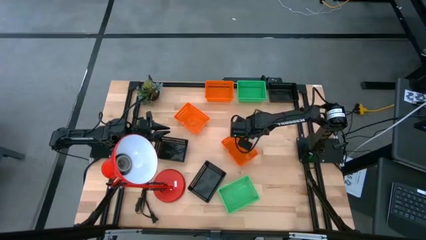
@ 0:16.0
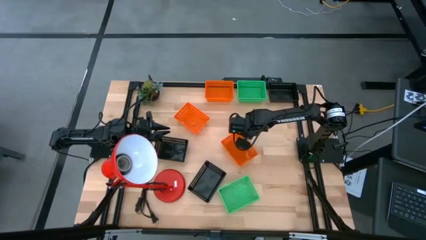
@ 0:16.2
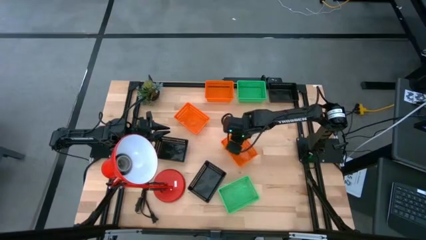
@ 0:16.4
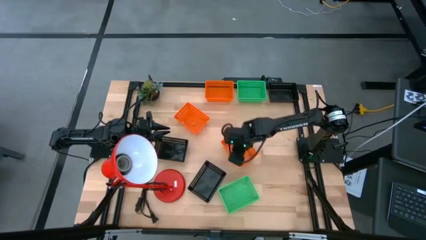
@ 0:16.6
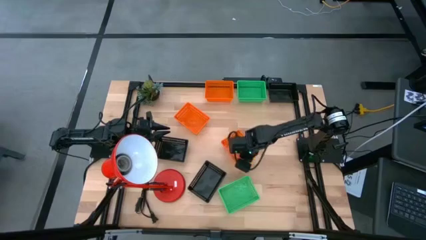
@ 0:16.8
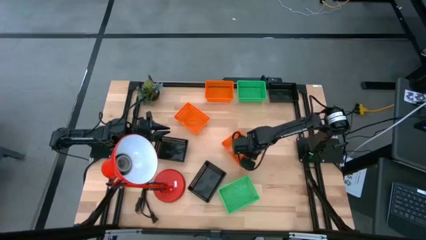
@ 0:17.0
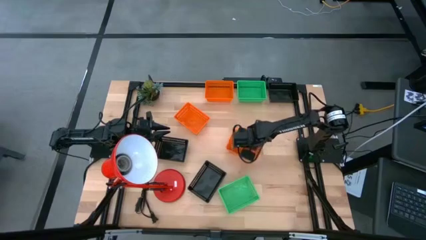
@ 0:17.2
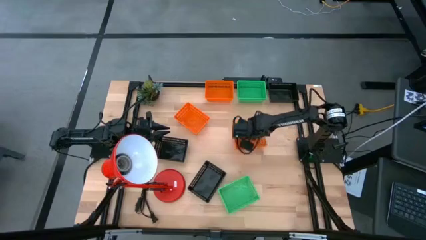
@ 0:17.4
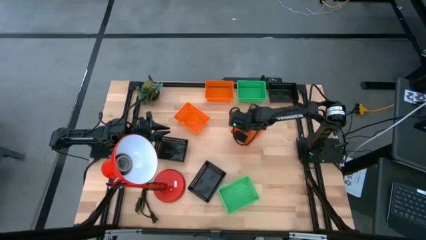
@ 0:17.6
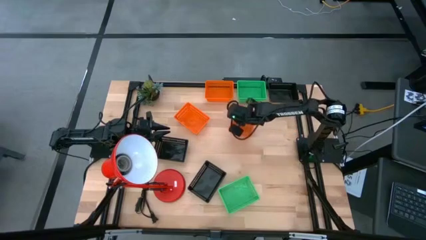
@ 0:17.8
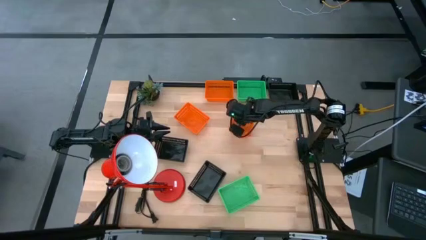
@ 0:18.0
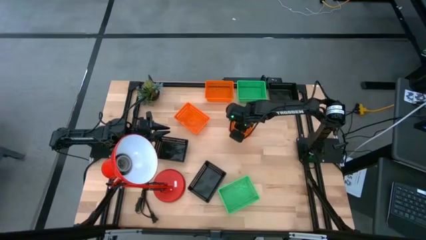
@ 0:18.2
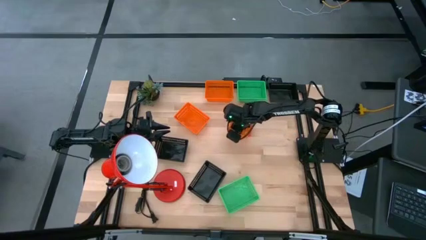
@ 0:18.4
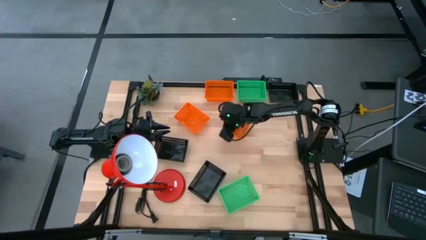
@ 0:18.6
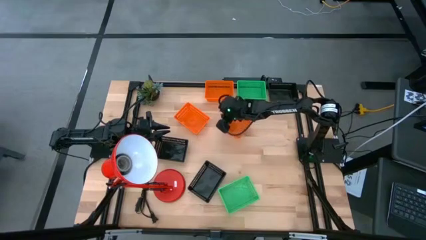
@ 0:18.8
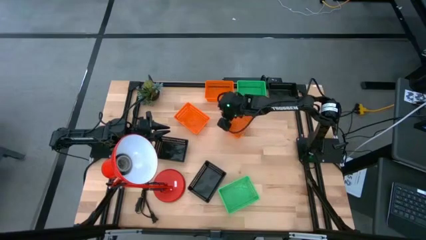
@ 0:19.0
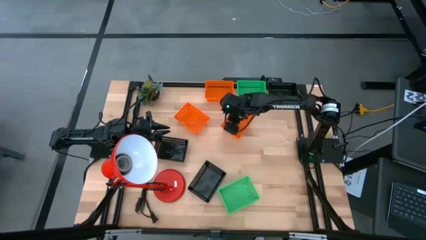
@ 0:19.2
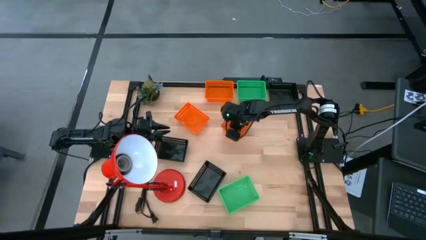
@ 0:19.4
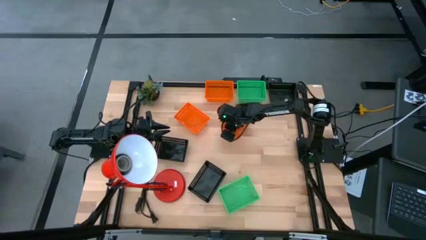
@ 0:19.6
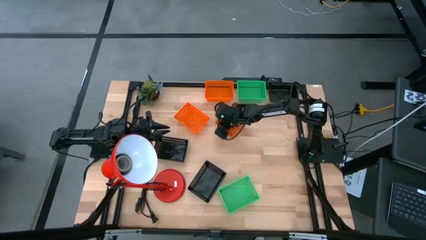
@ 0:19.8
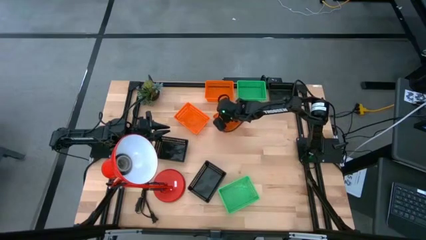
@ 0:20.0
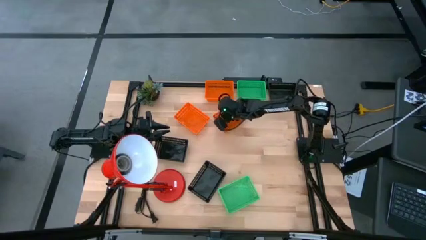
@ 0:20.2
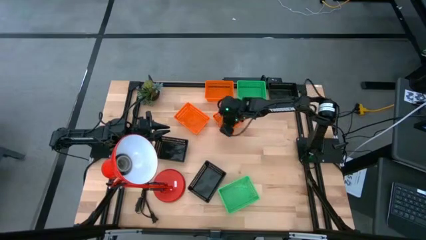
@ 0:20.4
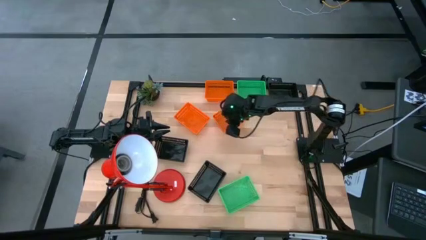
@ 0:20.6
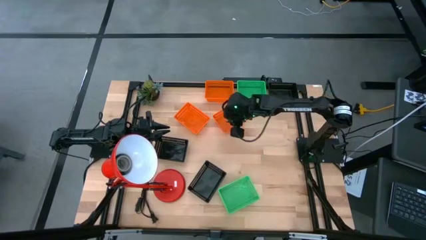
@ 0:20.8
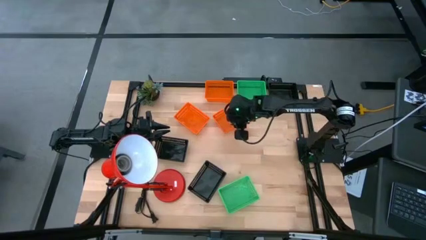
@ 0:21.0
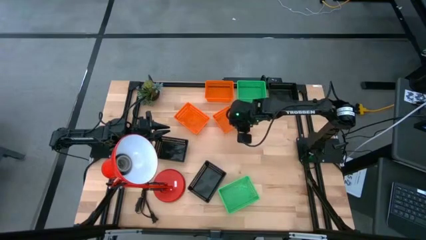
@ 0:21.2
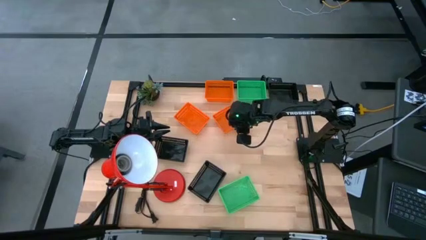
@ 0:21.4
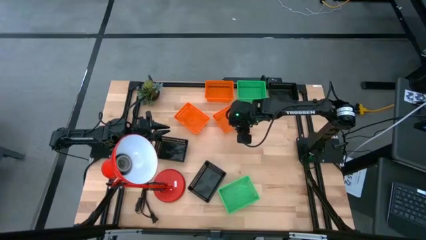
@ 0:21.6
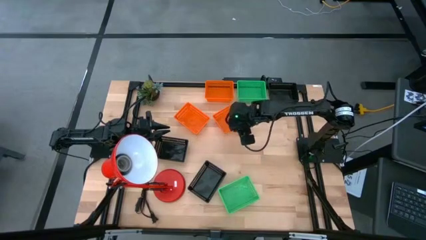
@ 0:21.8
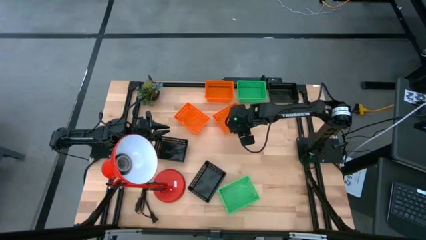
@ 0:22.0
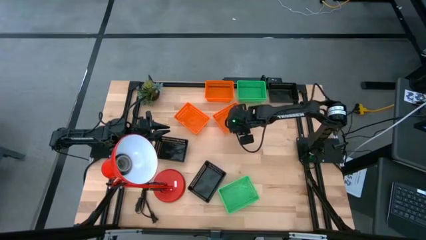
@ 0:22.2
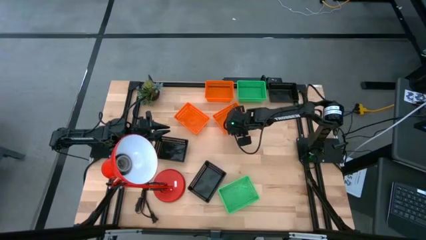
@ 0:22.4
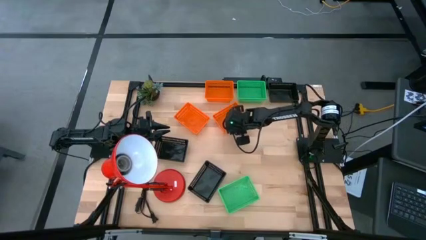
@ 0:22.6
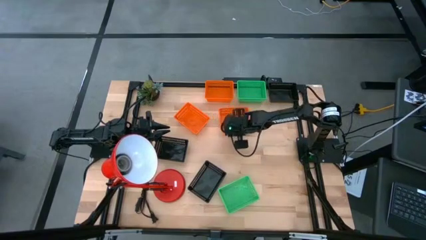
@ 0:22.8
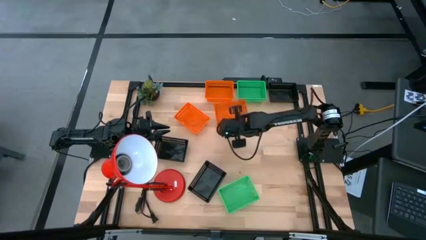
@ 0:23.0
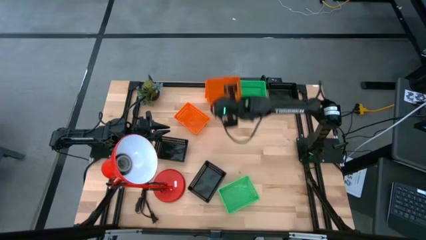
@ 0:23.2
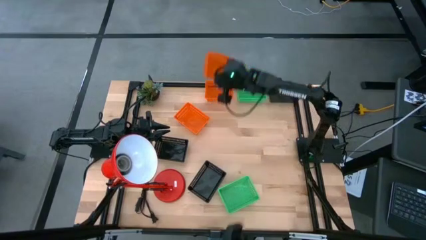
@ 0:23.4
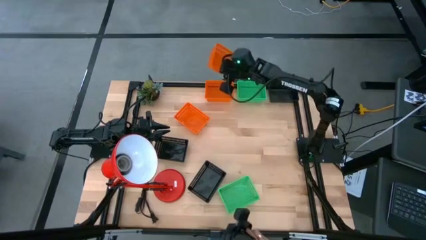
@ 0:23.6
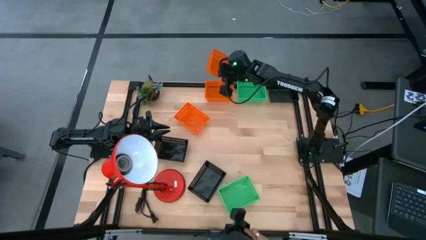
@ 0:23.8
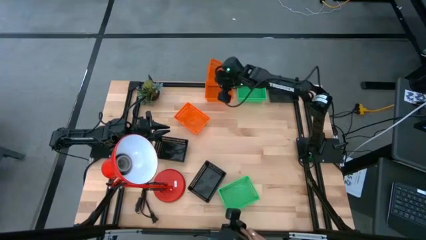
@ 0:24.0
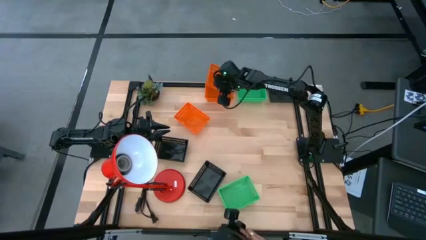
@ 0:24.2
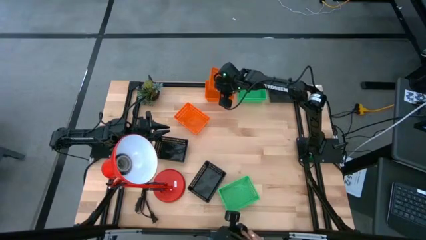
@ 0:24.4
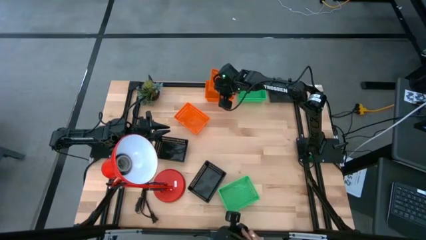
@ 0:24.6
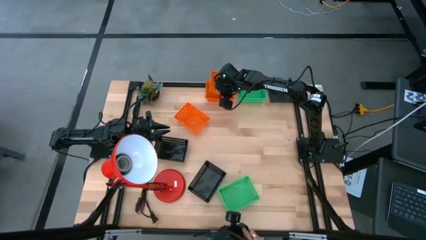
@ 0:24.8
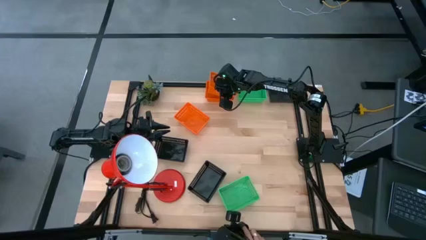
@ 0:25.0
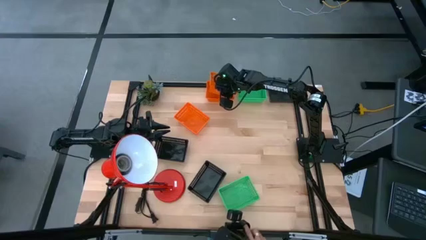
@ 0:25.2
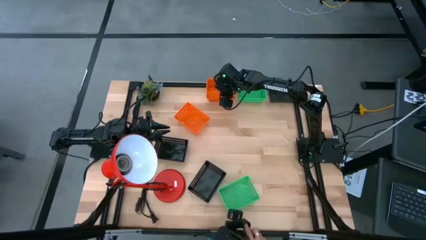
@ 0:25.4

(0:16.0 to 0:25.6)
Stack the bottom right orange bin on the top of the orange bin

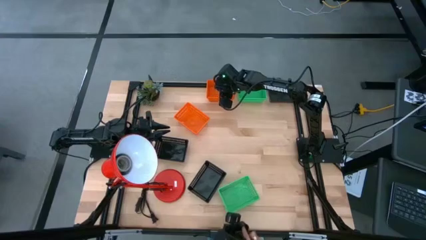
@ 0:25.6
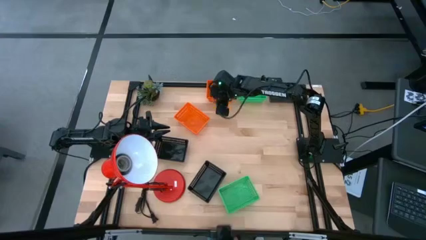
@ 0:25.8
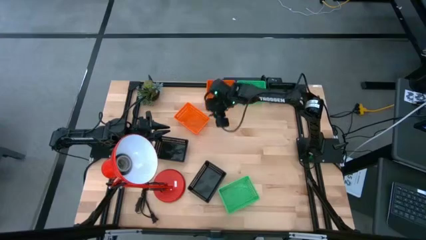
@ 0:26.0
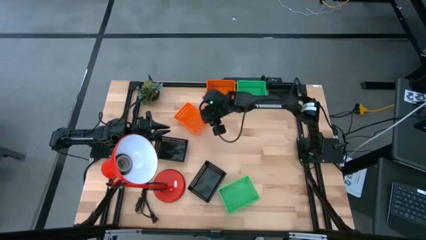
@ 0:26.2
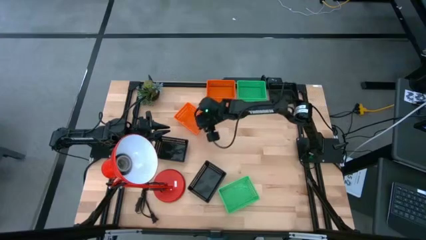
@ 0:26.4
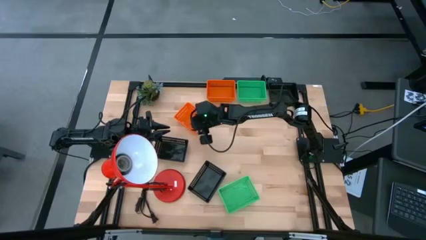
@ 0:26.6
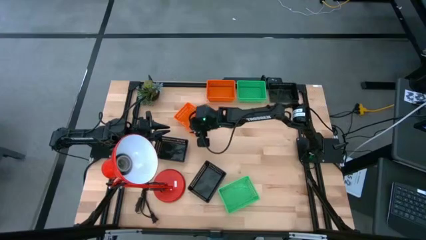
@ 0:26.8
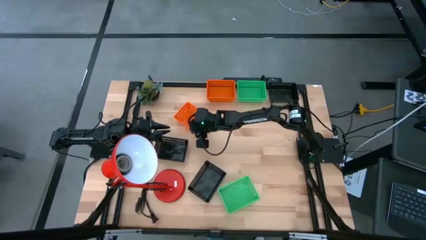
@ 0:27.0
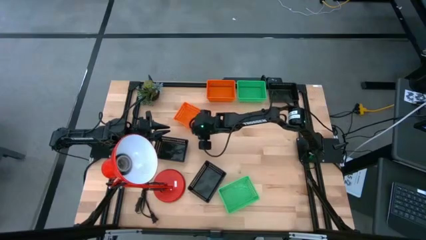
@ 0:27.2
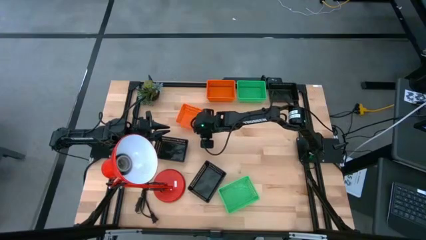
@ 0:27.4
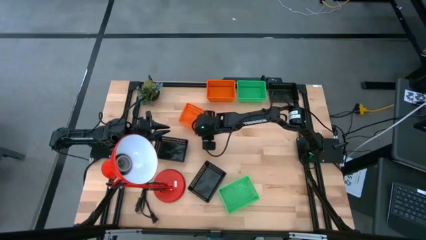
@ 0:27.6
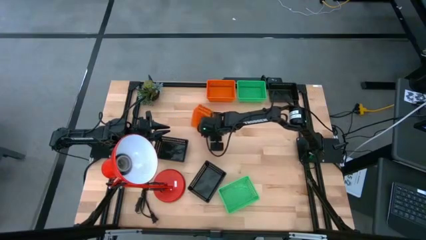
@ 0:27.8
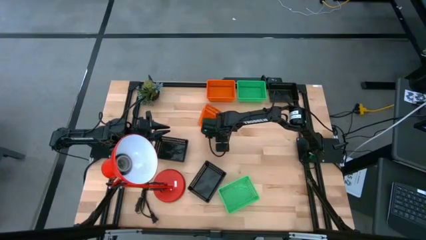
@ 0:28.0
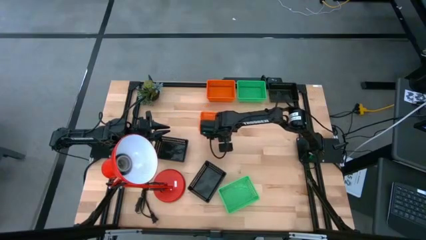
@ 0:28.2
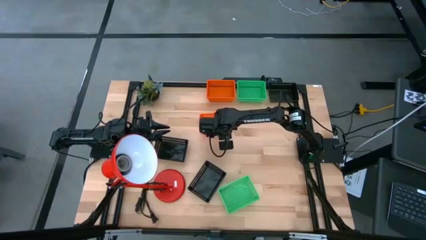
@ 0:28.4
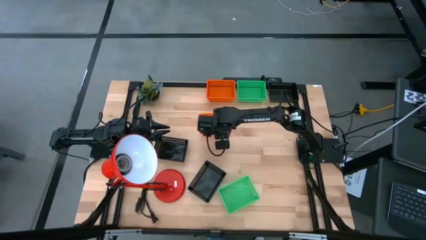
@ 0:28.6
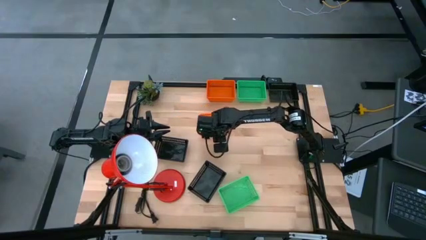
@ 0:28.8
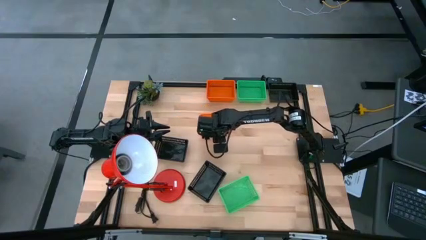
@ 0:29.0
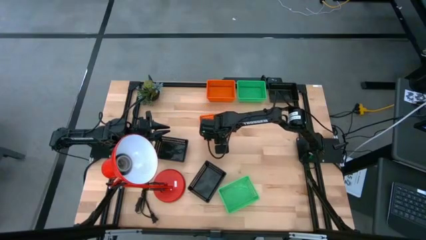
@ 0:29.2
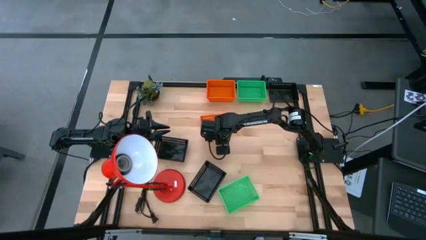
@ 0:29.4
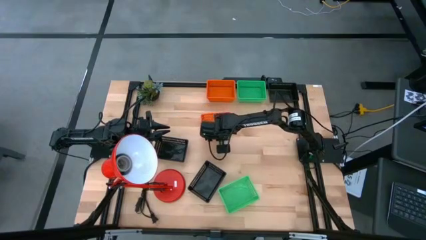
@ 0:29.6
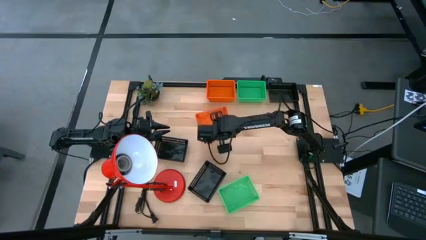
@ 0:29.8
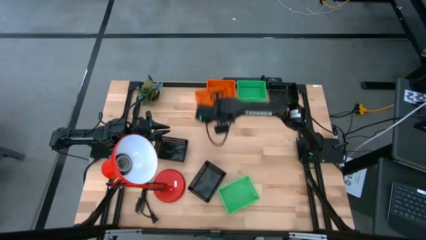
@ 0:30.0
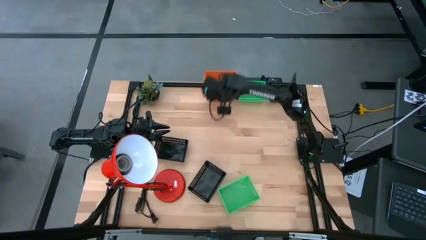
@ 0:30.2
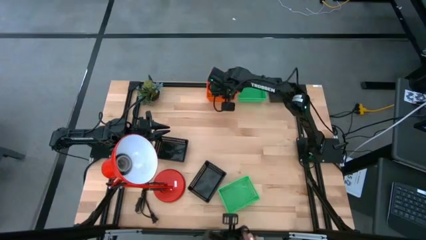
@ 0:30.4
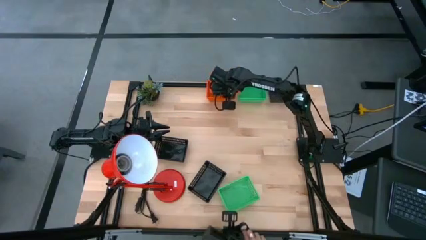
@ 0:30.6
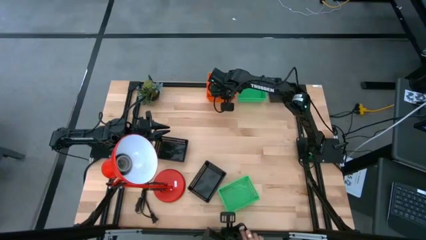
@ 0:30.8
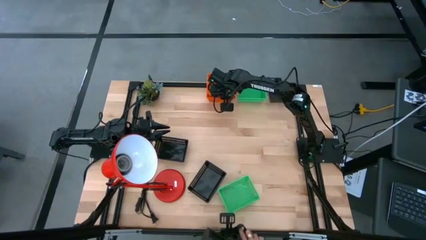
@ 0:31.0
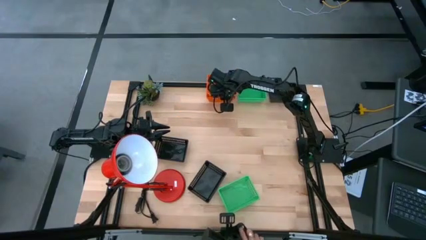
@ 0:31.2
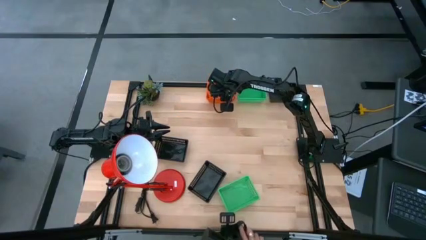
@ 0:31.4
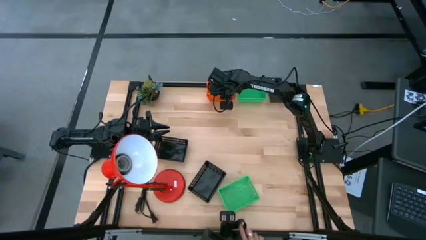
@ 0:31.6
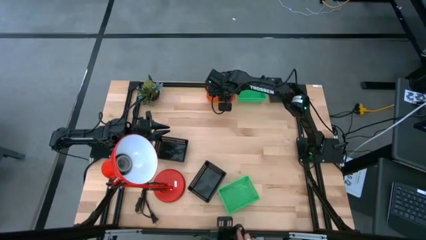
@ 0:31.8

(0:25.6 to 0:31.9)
Stack the bottom orange bin on top of the top stacked orange bins
